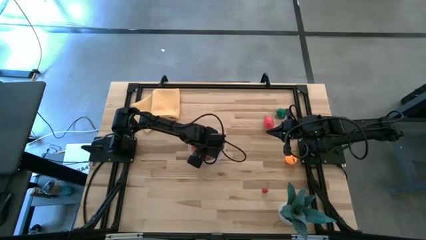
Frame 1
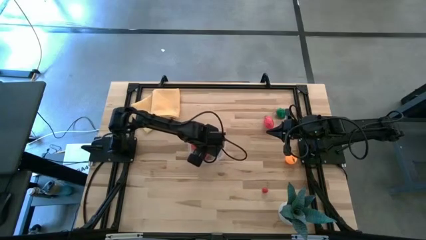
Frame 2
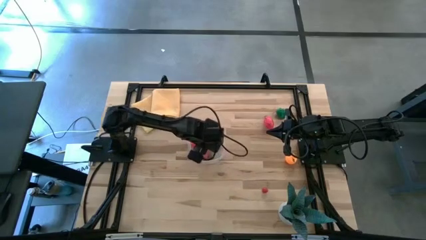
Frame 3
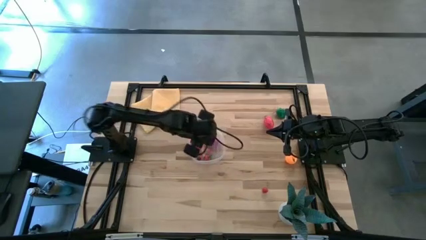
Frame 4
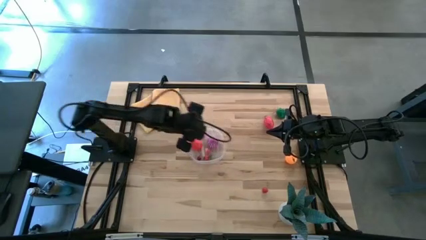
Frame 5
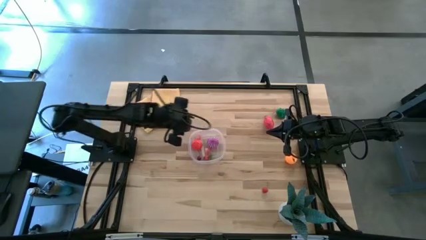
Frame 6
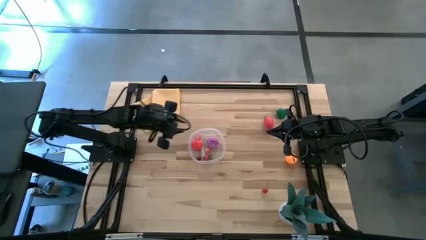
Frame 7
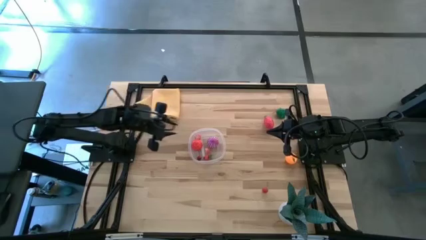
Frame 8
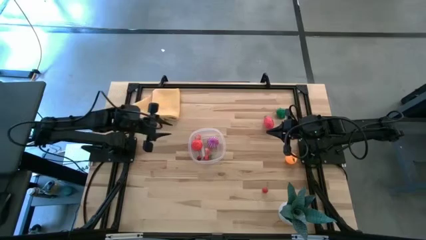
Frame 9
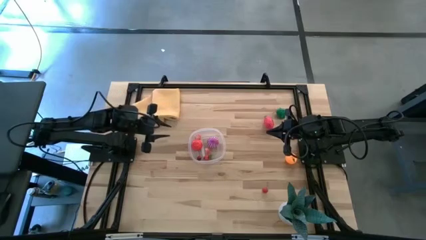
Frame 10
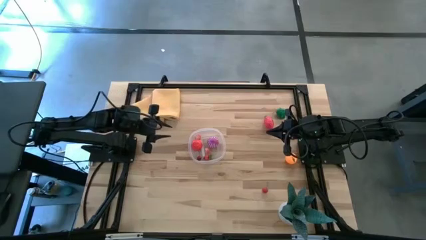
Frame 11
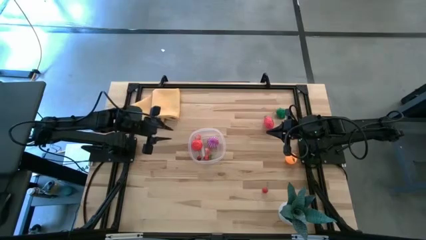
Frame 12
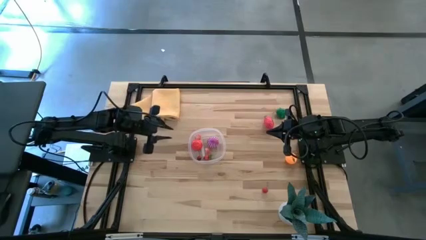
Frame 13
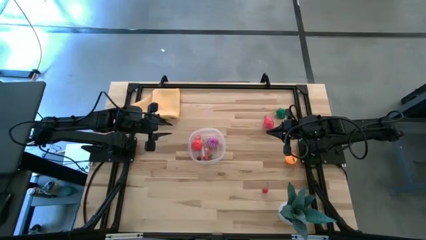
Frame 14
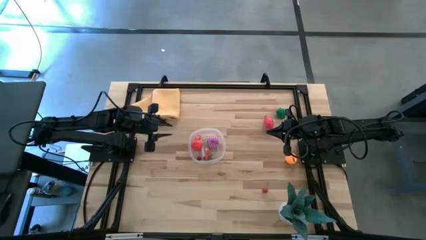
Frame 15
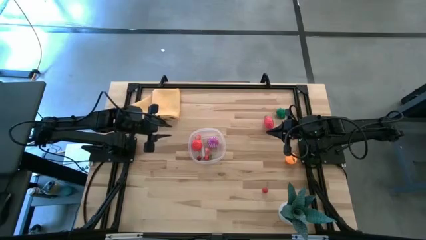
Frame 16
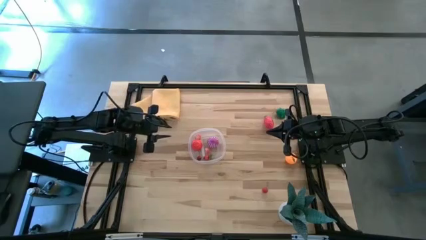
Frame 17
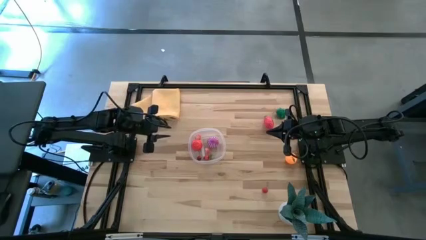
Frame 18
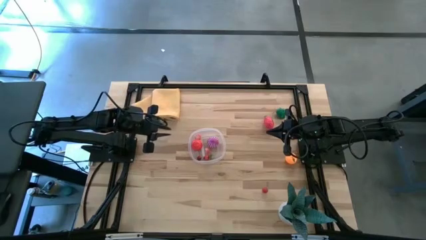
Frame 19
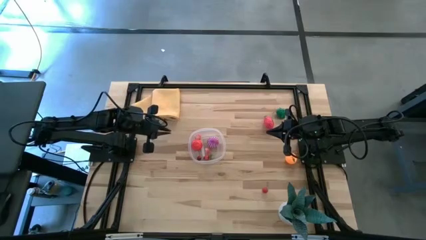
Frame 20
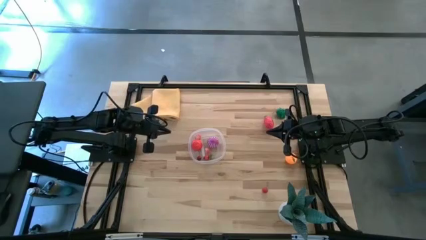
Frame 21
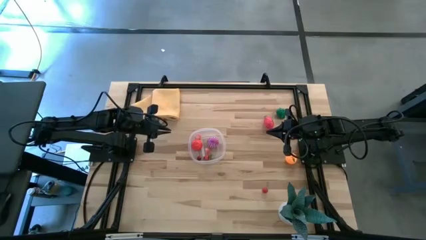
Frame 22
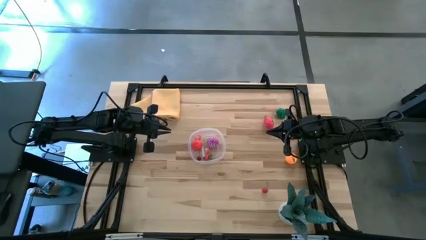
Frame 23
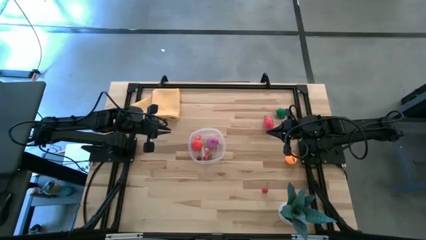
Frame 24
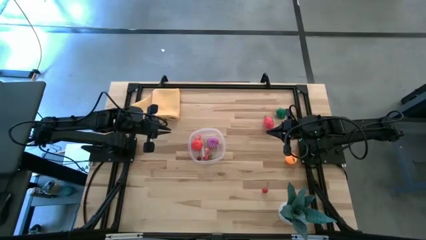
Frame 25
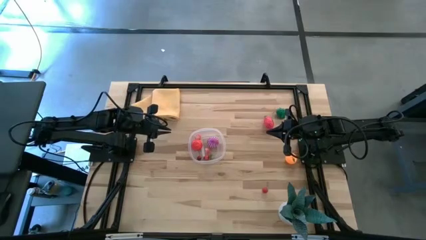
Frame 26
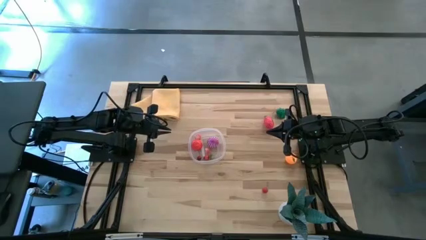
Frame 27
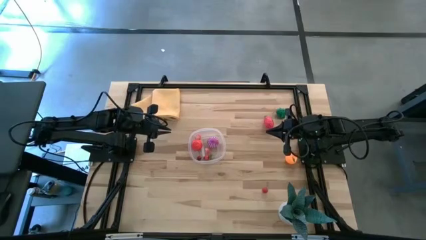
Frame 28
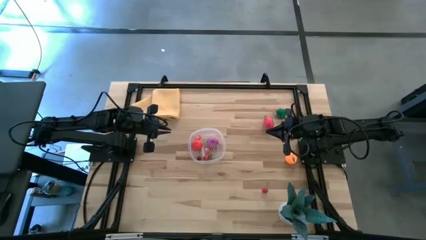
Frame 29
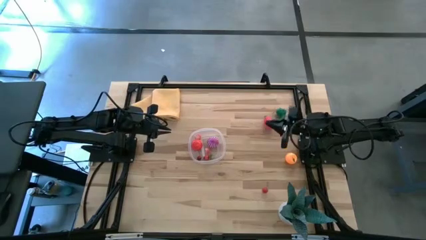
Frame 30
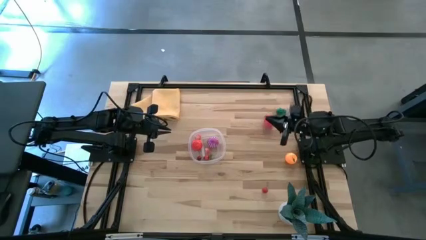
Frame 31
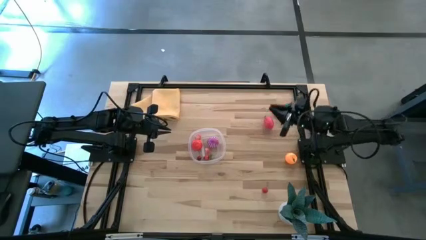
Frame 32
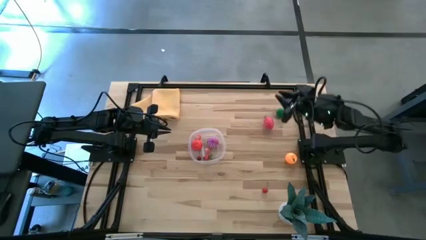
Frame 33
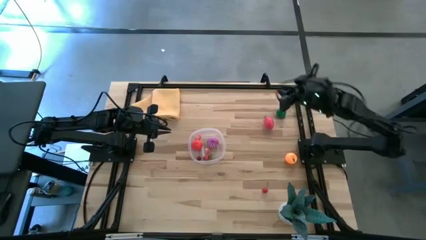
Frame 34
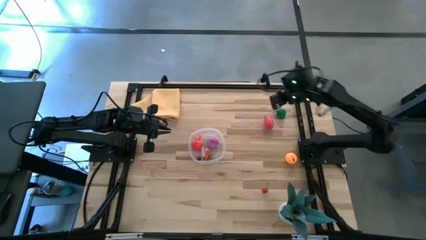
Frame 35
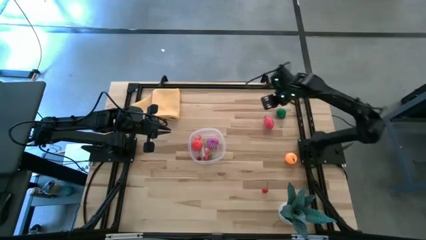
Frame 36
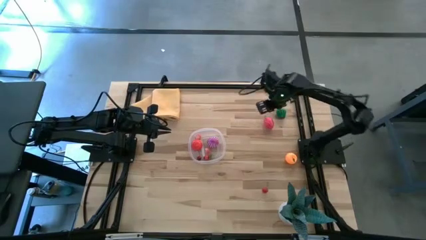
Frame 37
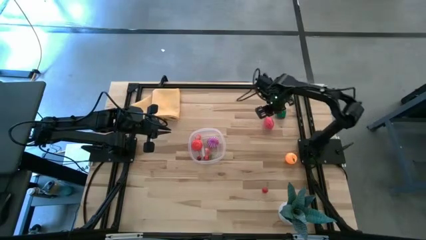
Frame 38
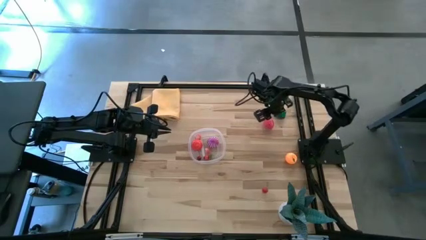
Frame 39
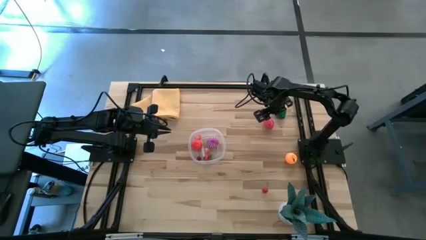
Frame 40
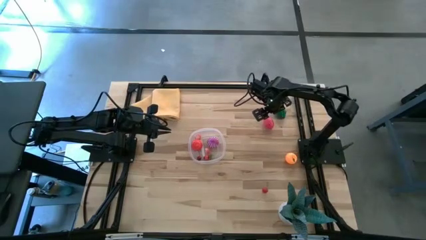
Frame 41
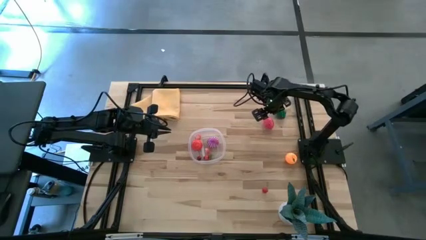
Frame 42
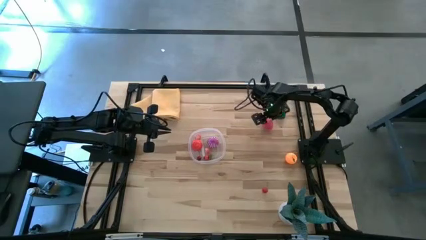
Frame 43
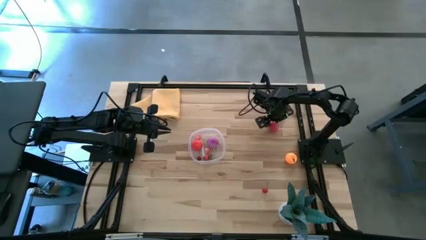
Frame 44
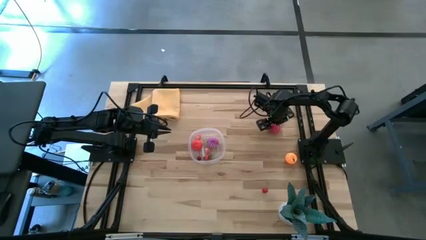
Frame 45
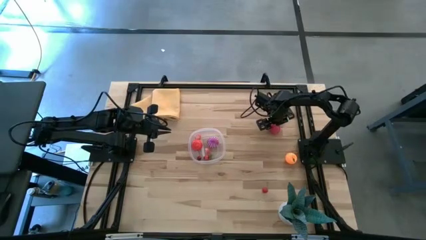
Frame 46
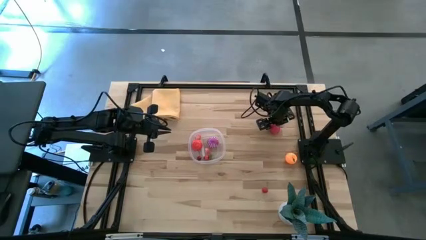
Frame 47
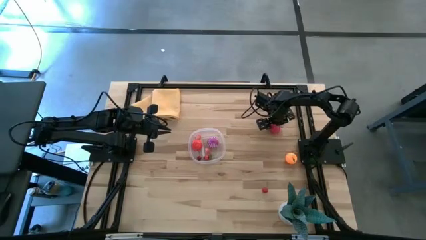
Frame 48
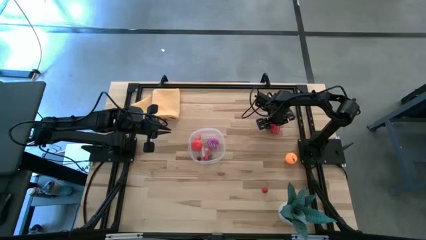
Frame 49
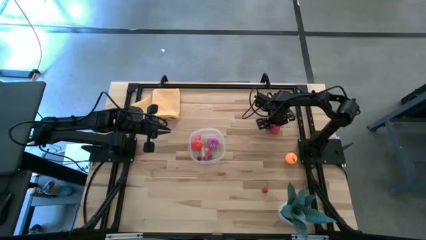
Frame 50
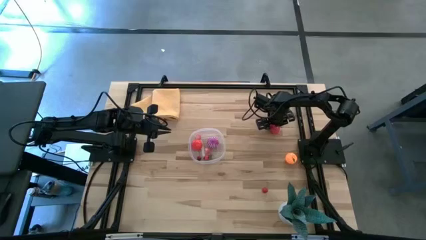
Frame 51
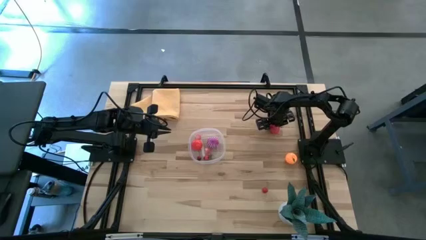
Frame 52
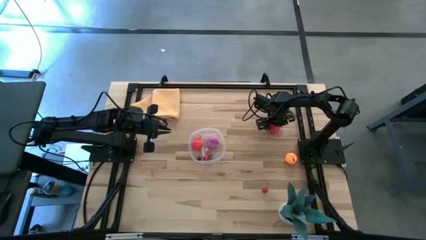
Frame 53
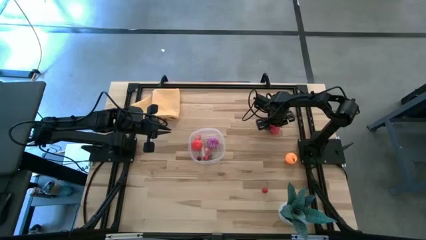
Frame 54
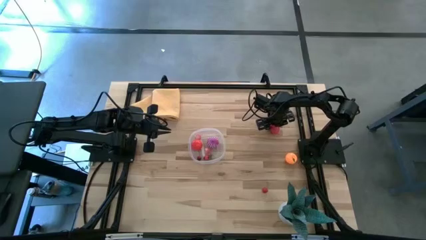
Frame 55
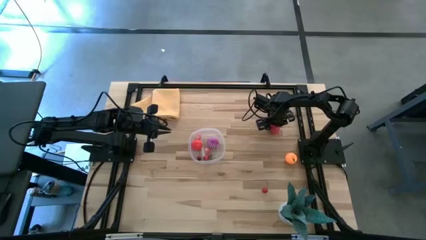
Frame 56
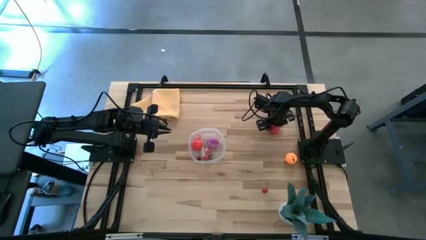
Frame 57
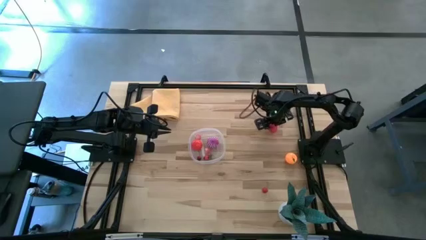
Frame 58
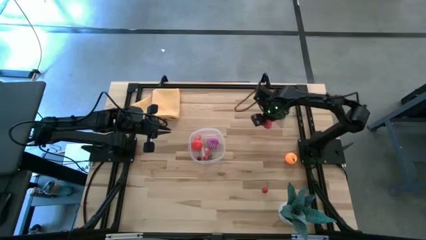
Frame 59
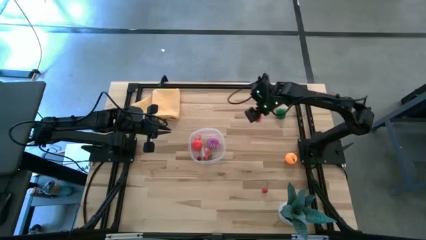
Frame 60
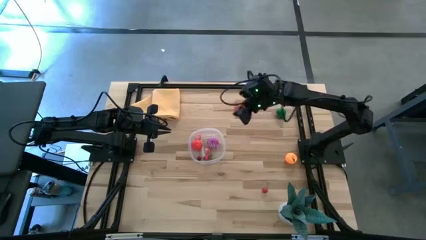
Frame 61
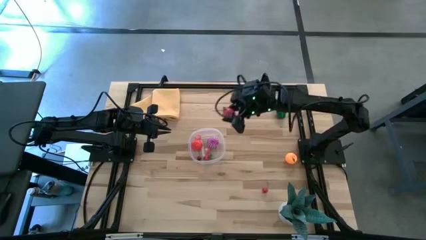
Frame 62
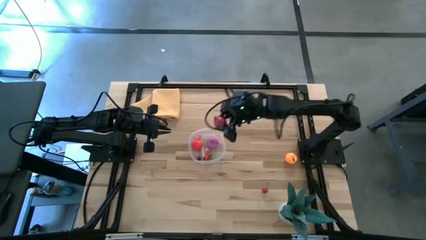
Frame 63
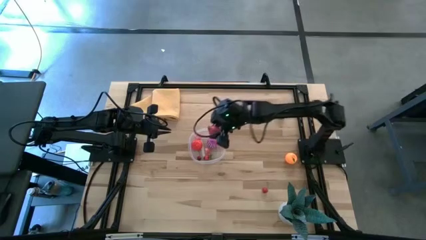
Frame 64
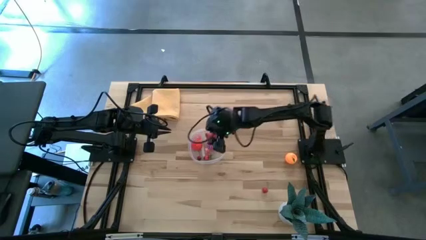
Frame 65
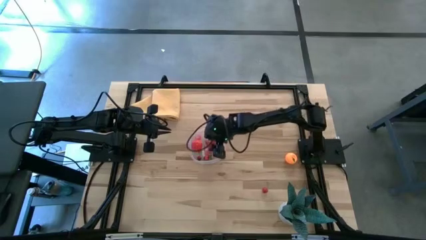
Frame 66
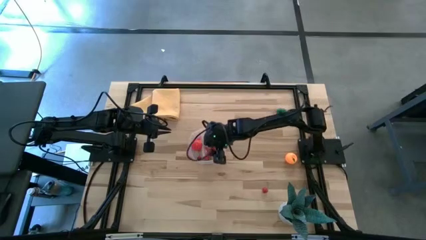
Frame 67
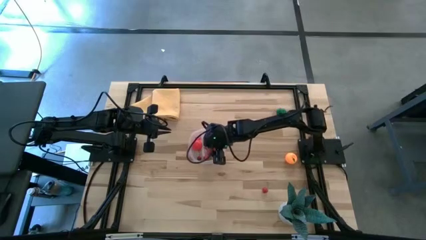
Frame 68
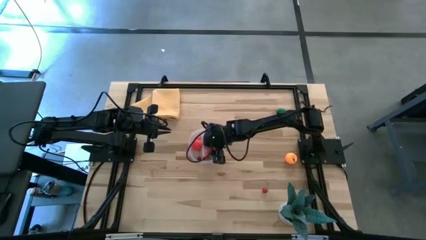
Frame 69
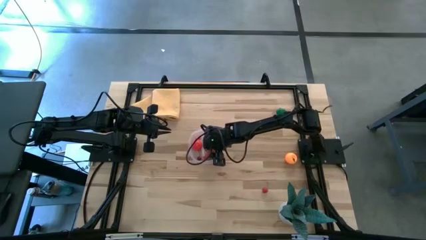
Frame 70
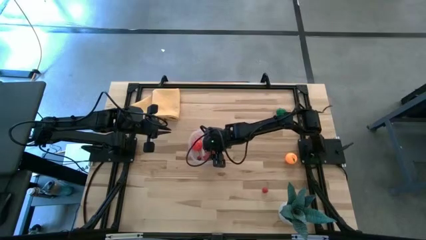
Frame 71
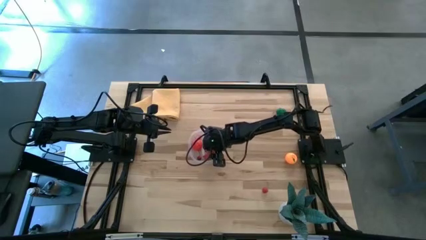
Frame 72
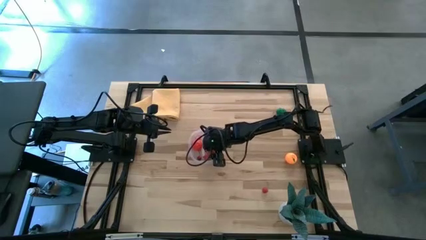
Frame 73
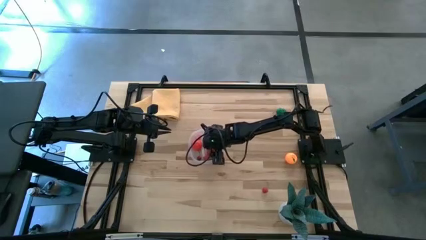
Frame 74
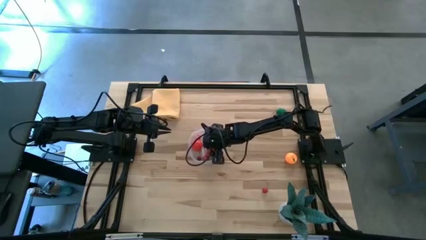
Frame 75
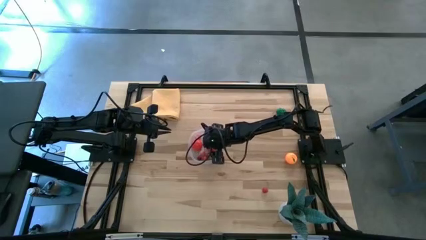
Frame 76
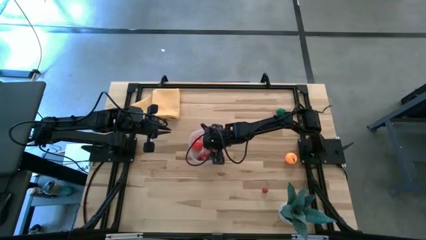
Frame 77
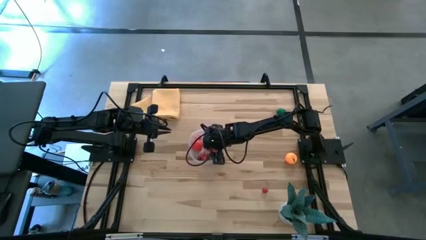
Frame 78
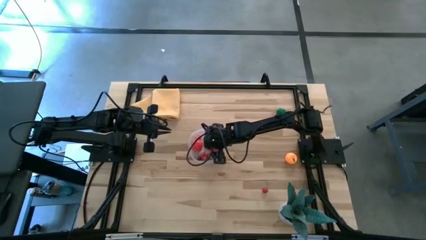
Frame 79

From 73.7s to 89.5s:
Task: Pick and placing Produce into tupperware
Put the dragon fruit into the transparent bin
